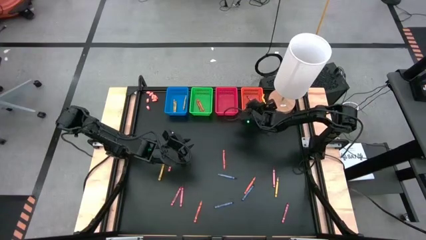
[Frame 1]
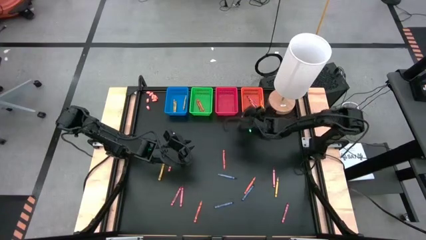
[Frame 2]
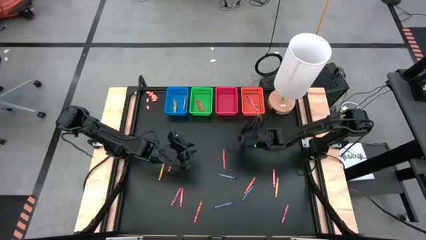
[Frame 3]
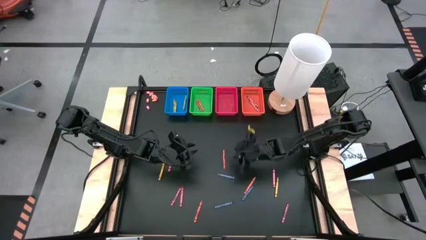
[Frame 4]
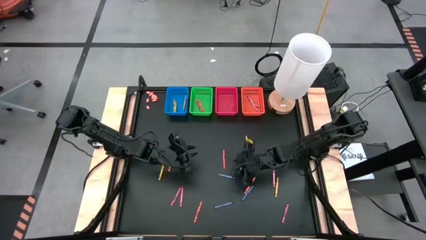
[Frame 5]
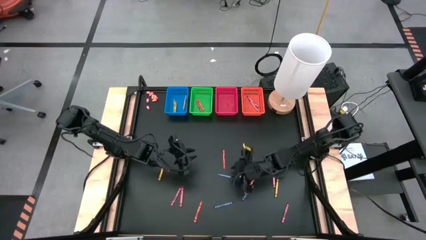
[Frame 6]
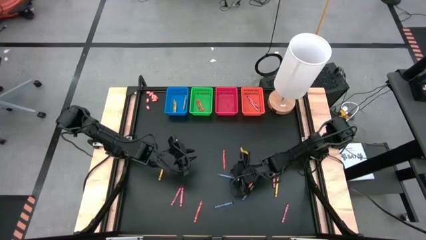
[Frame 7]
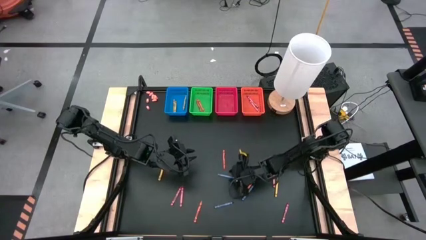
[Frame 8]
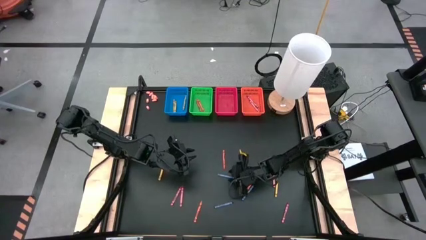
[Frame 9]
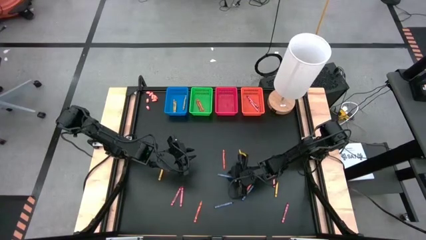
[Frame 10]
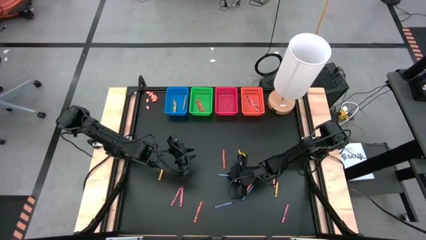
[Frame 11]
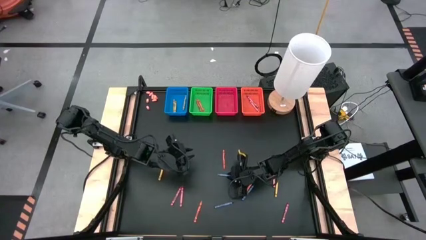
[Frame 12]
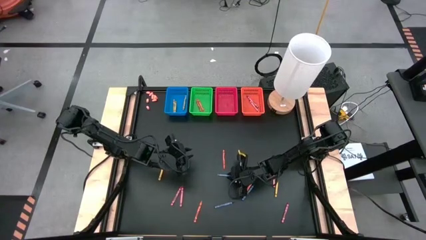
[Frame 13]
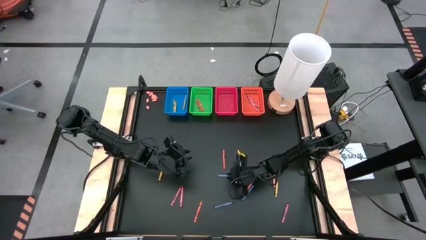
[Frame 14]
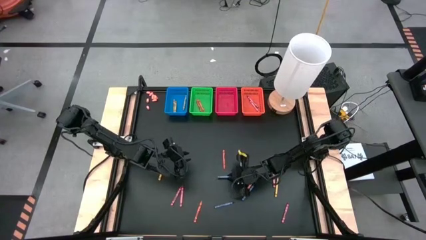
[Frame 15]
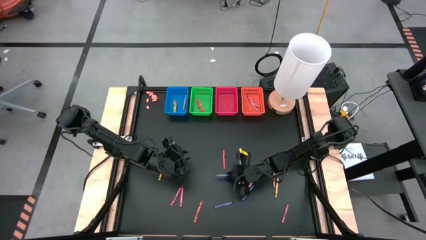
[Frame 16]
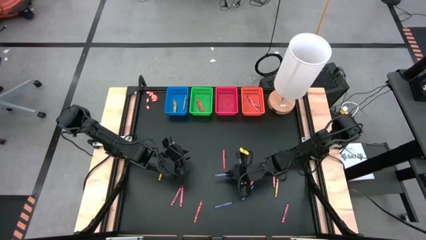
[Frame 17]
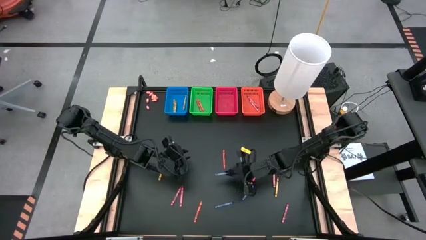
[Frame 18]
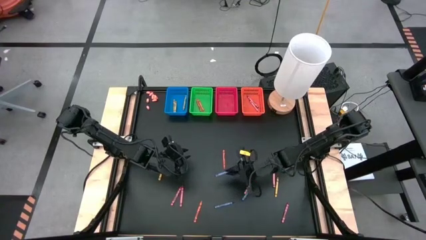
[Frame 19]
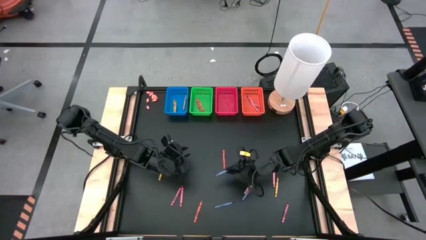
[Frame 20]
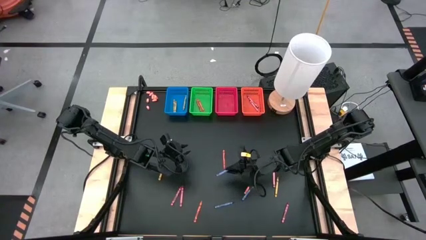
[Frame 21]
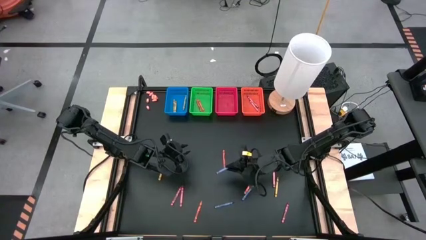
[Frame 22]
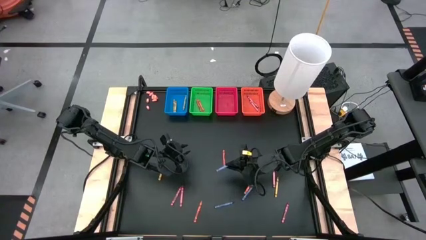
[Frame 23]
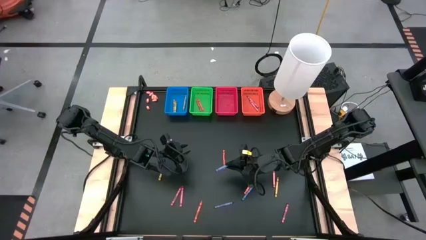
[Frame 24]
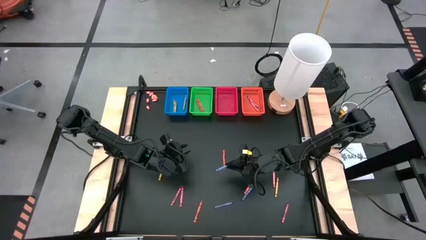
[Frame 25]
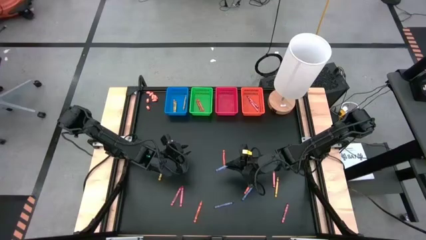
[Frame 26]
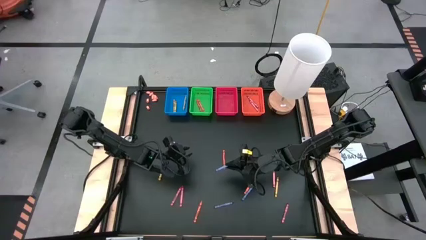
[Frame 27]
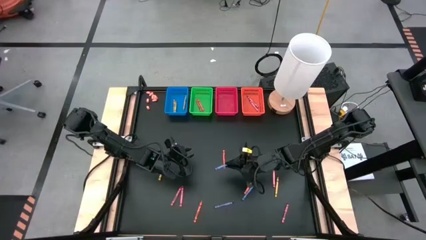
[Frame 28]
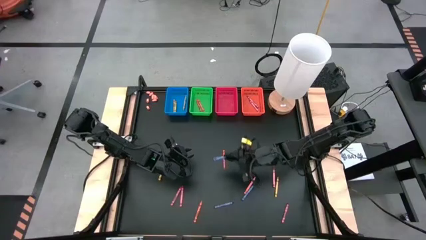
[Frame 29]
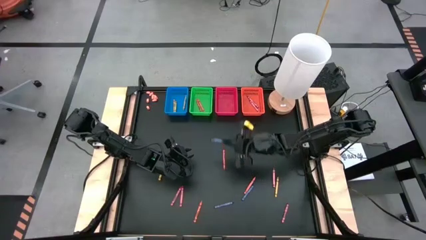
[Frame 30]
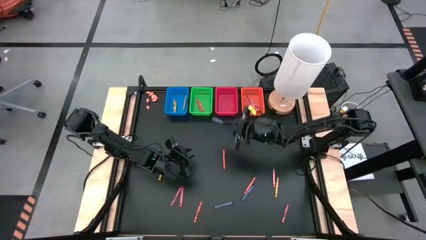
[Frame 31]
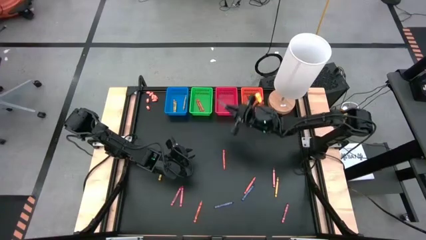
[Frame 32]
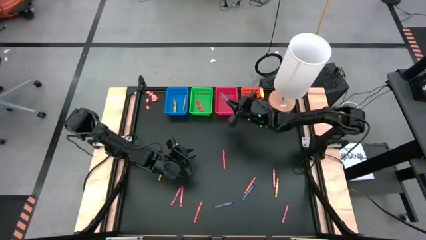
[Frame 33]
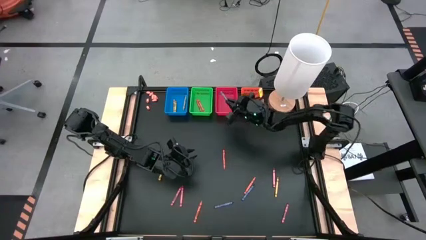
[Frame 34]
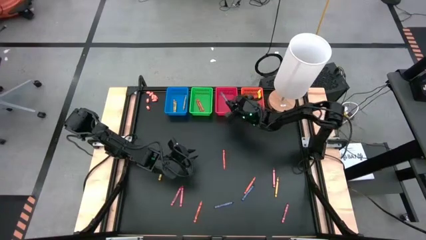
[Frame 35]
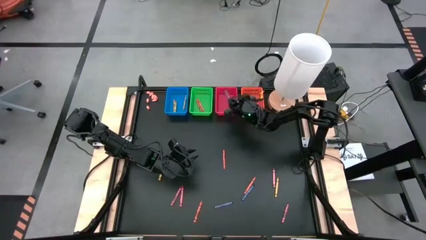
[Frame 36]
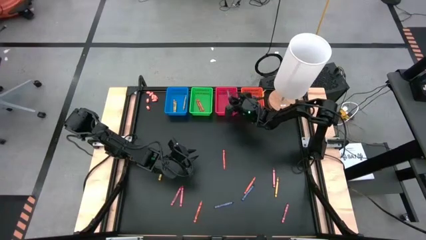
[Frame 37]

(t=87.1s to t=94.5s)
Task: Sort crayons
Put the blue crayon into the red bin

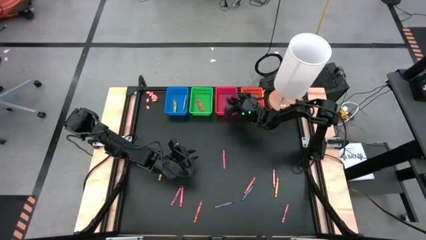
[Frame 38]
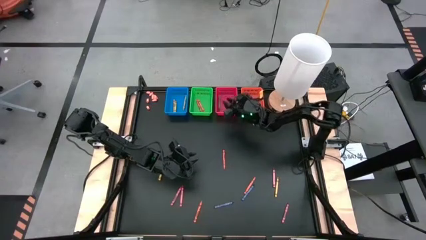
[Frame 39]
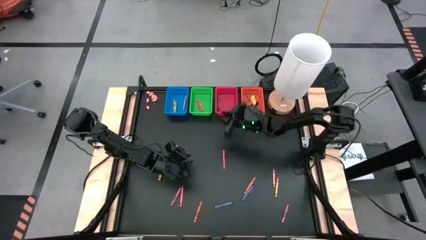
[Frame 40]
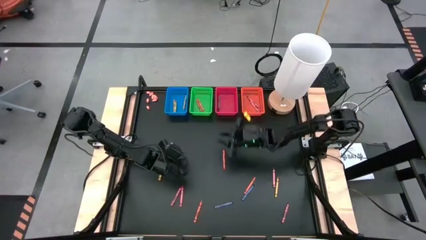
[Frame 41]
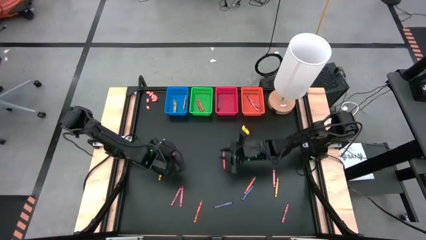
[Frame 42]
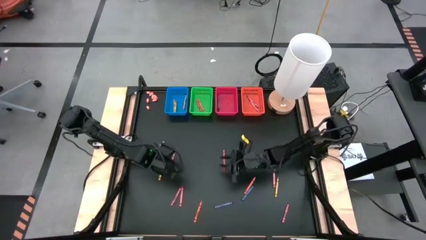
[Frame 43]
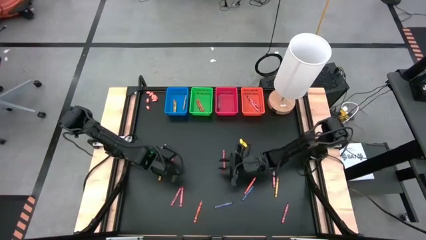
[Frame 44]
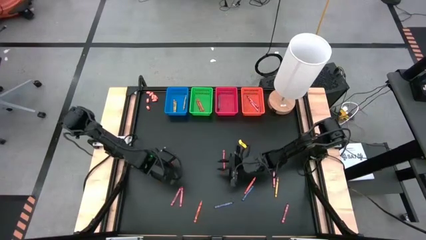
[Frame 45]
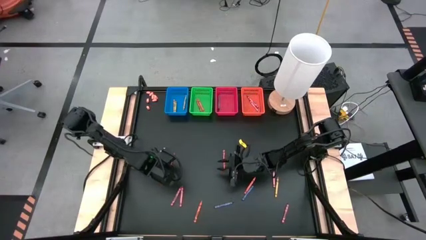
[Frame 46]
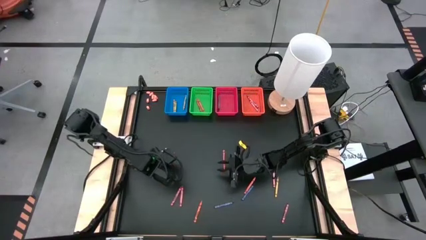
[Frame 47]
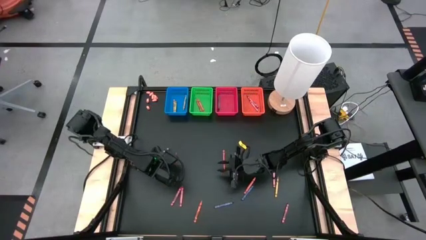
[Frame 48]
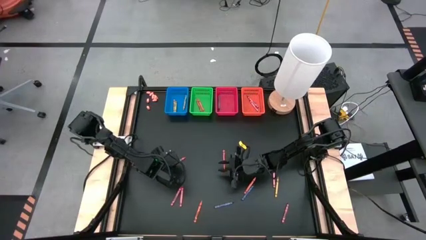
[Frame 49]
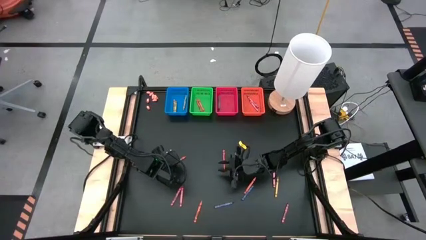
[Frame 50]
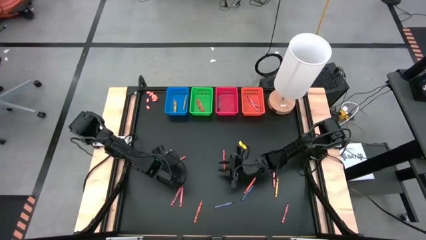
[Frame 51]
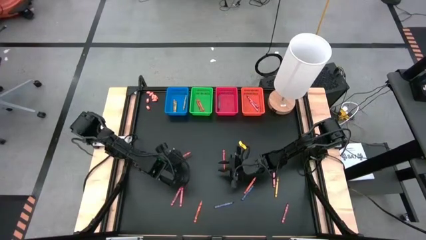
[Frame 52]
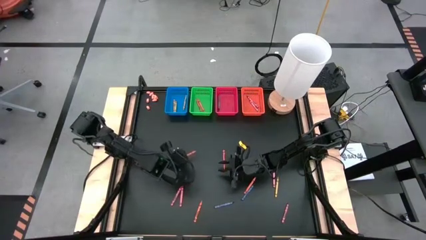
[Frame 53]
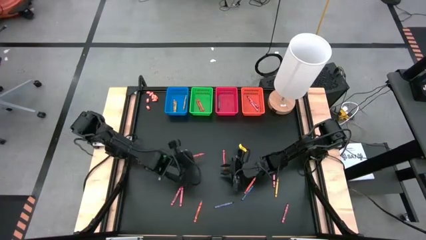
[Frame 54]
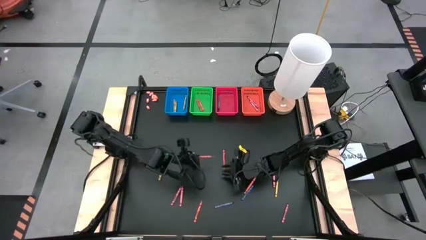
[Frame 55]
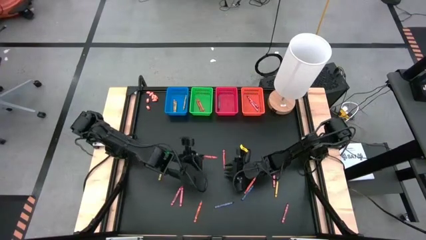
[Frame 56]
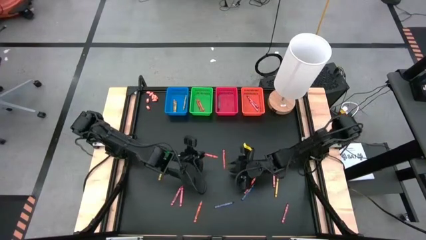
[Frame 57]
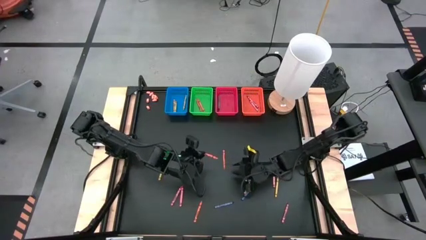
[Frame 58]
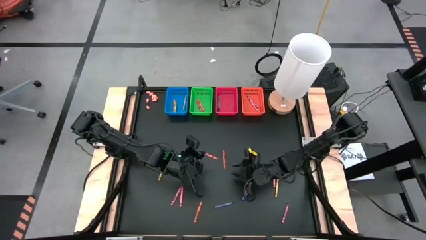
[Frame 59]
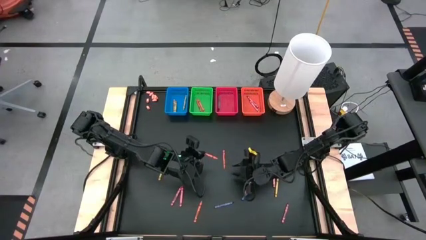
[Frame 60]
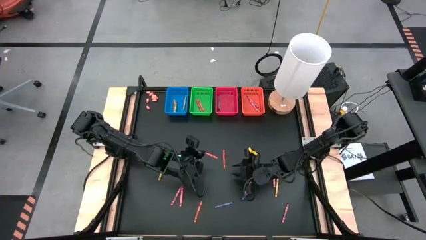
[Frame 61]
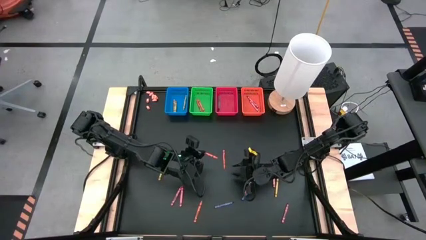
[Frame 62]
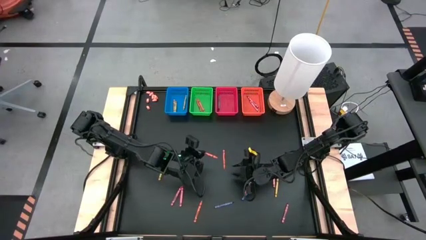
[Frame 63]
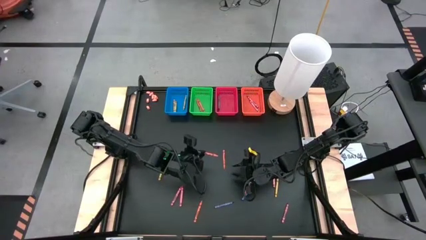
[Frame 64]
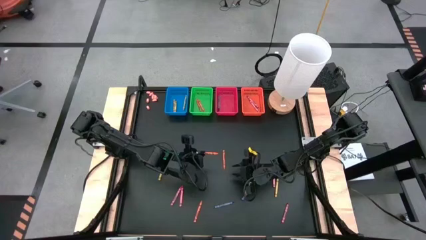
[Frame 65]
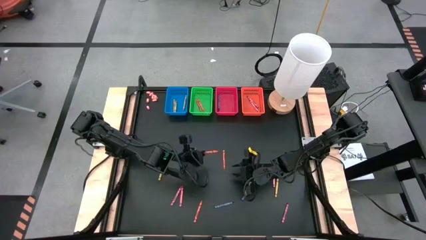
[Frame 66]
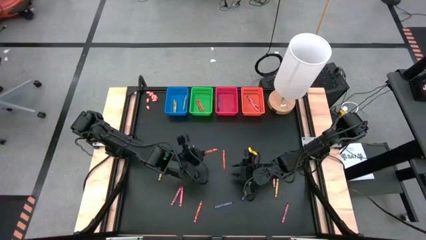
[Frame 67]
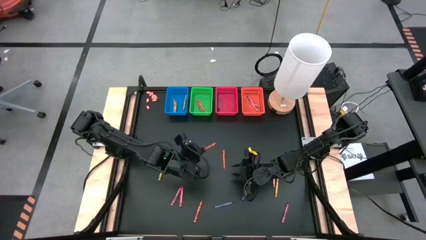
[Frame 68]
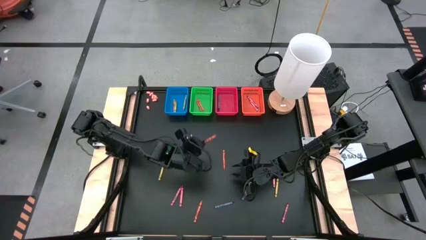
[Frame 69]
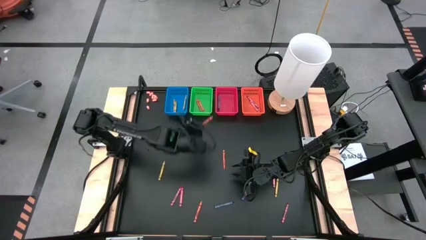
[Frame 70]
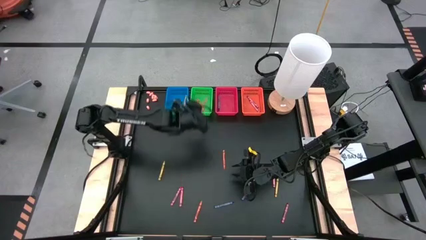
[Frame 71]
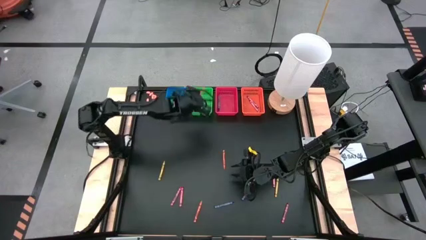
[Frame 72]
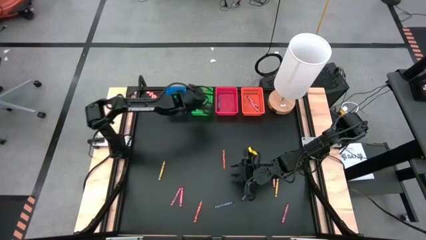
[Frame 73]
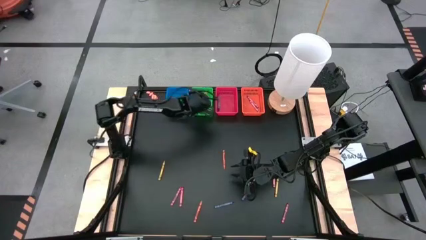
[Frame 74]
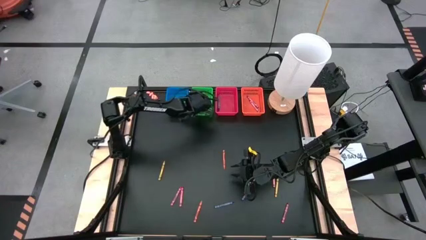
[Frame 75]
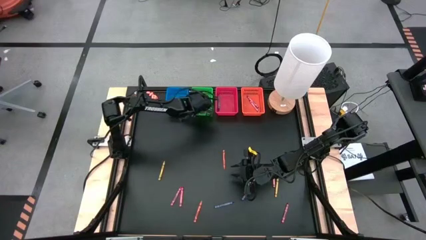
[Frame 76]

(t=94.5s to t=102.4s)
Put the orange crayon into the green bin

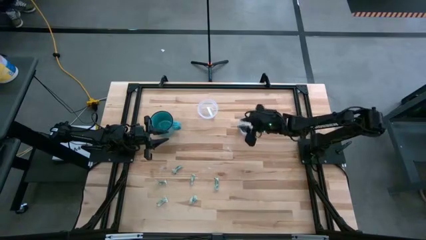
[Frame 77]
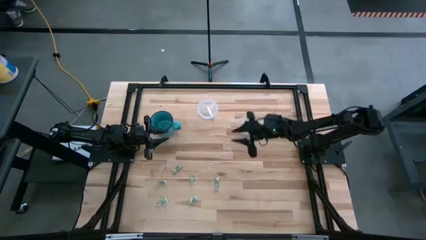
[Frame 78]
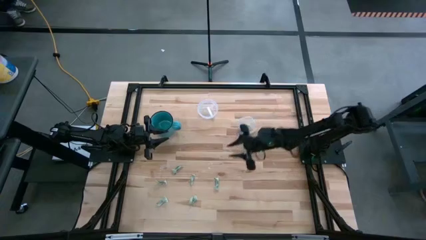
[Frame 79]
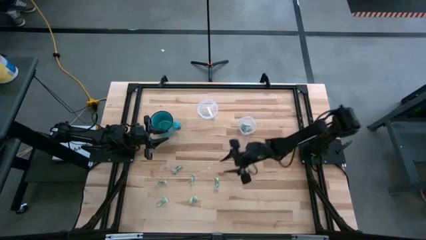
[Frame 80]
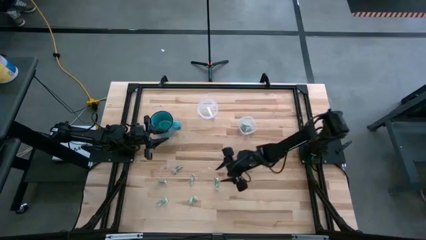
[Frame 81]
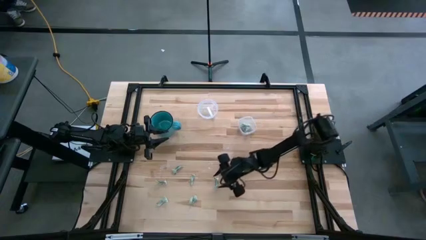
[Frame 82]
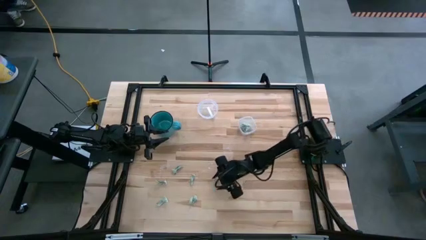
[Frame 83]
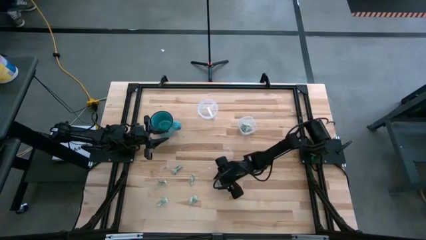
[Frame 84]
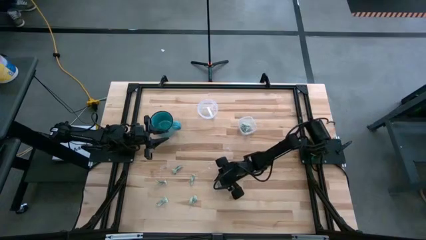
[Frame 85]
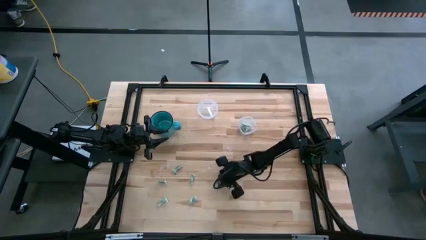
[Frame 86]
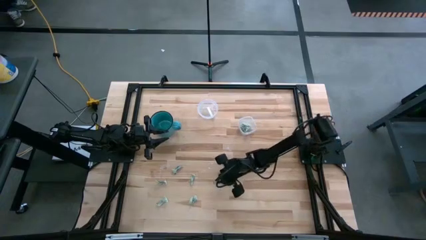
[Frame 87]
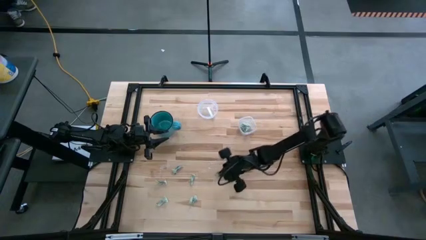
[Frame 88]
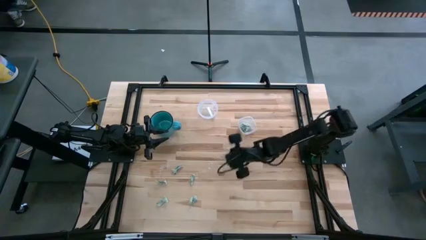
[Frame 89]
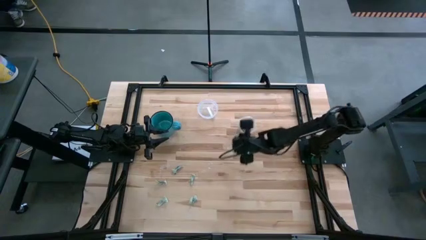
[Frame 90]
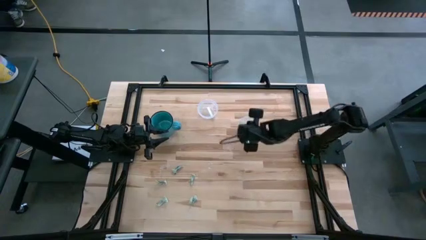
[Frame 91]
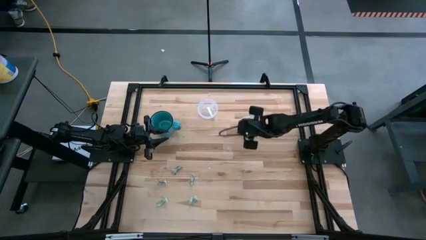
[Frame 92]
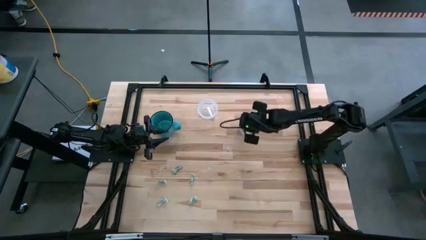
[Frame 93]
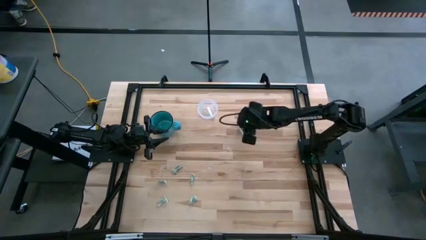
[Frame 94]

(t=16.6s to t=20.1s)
Task: Pick and place items into bin
Put the stevia packet into the small transparent bin
